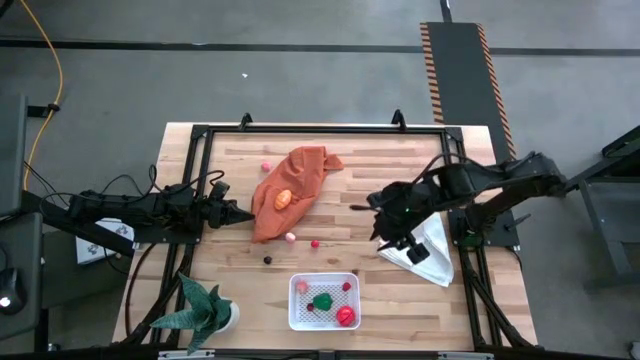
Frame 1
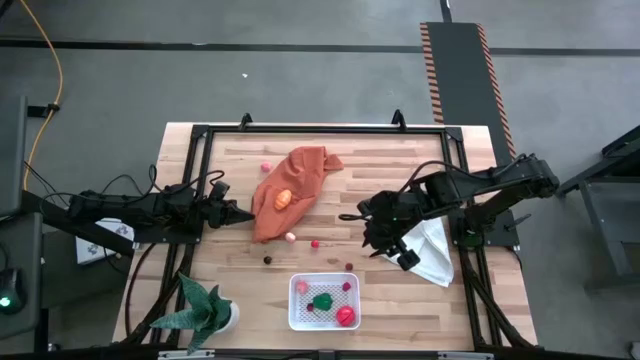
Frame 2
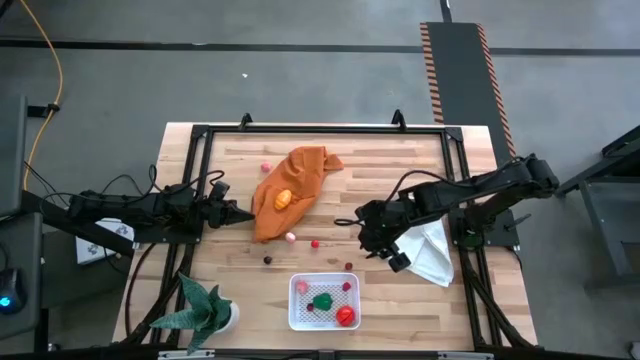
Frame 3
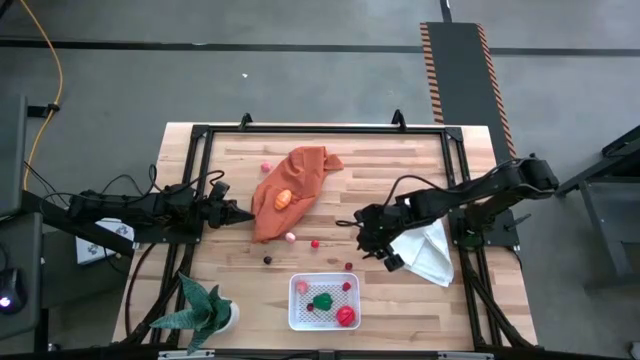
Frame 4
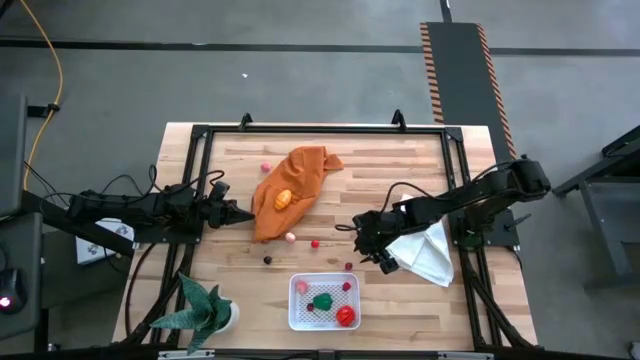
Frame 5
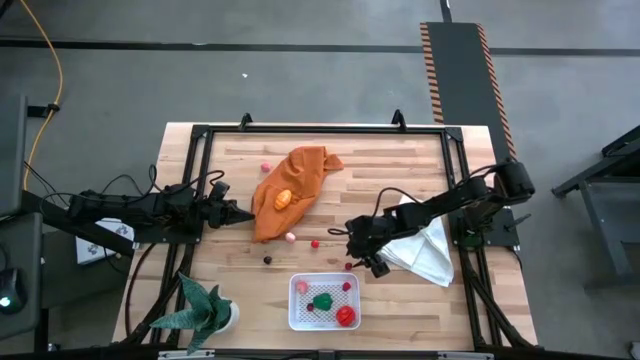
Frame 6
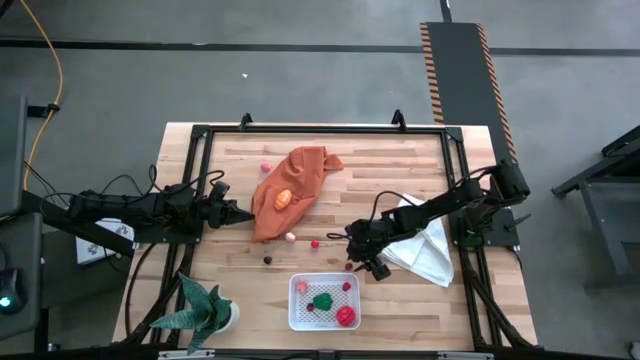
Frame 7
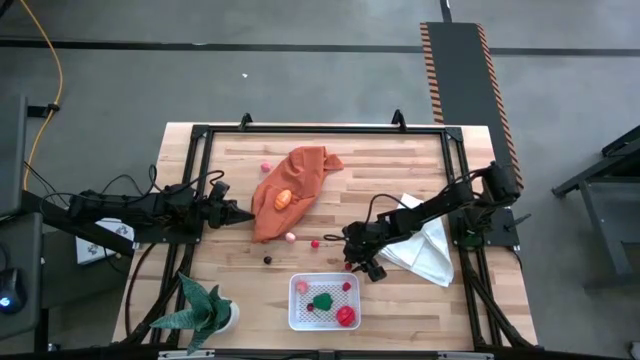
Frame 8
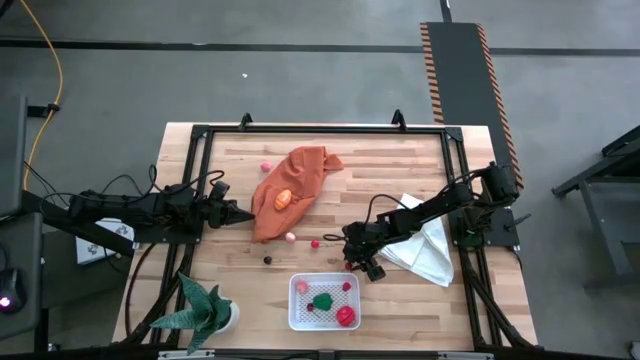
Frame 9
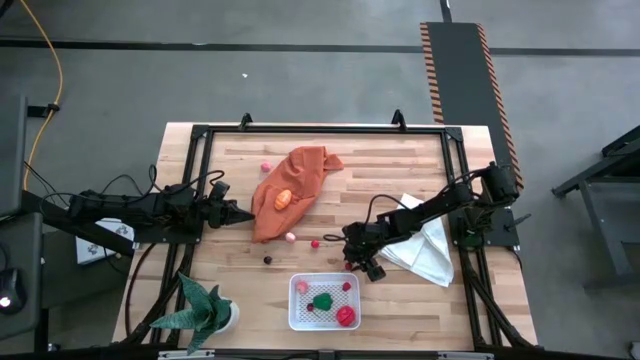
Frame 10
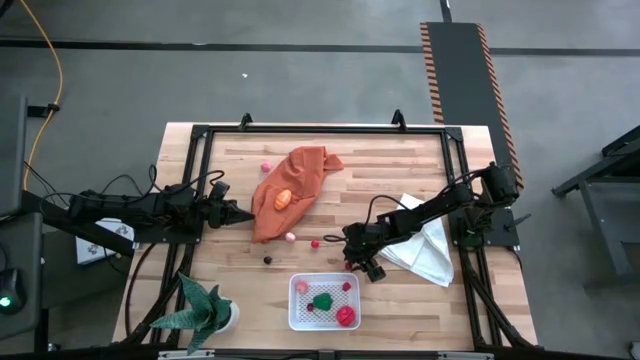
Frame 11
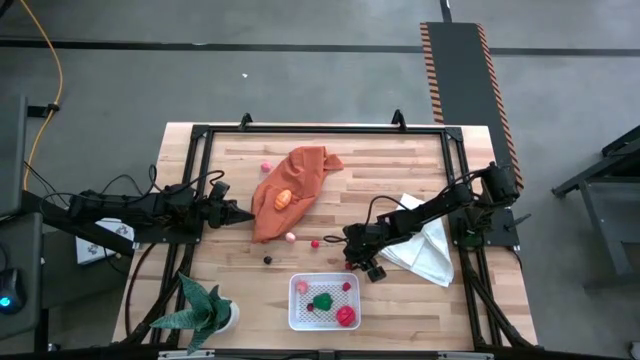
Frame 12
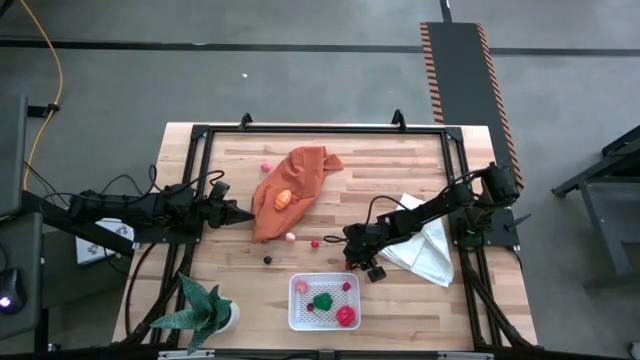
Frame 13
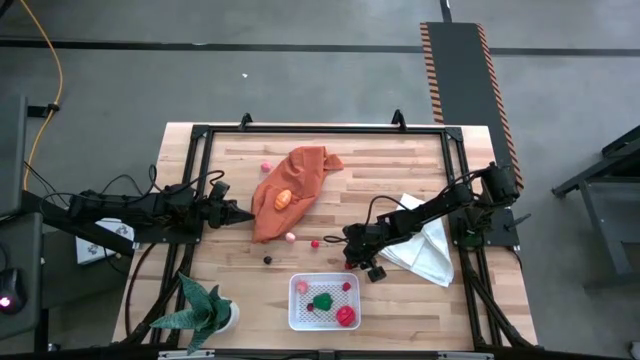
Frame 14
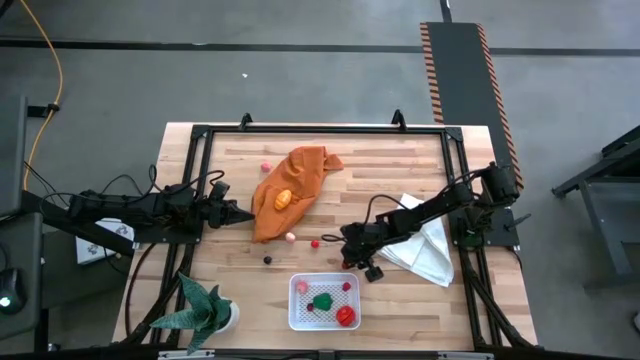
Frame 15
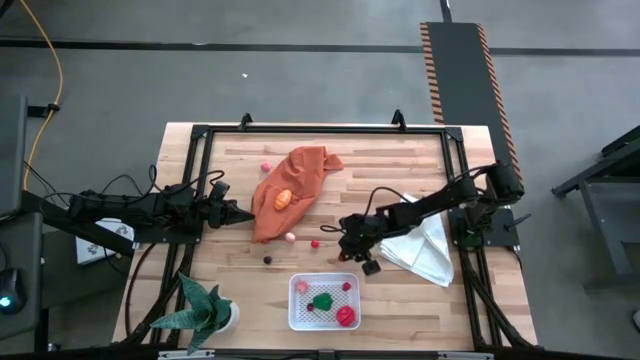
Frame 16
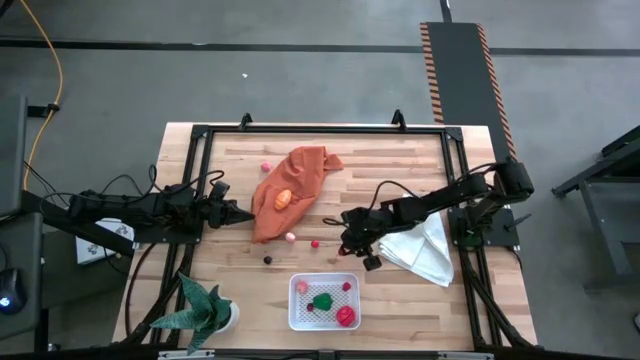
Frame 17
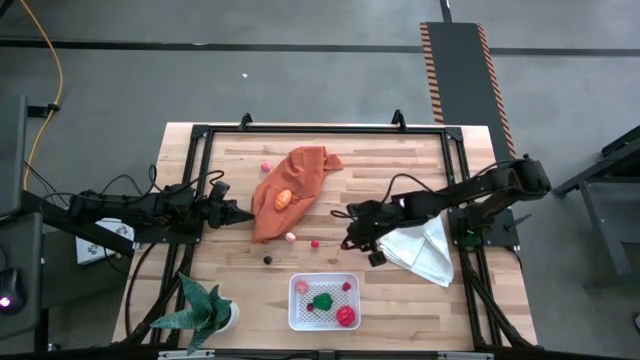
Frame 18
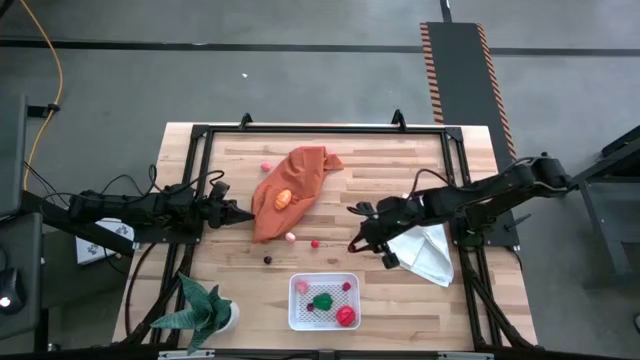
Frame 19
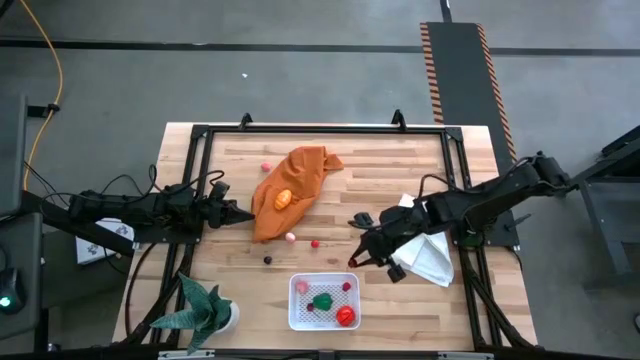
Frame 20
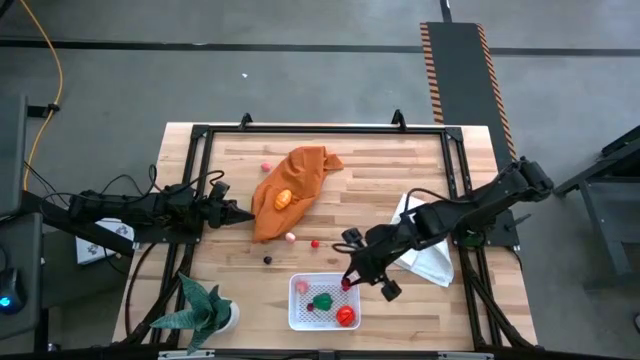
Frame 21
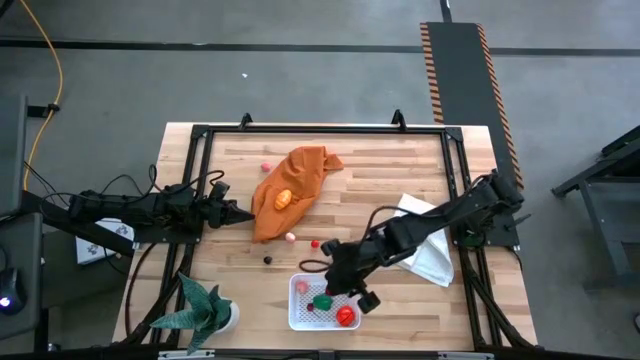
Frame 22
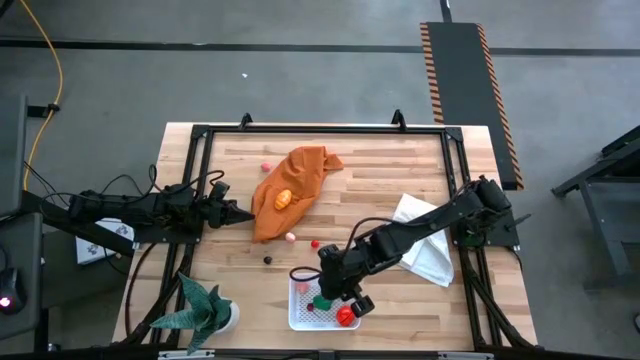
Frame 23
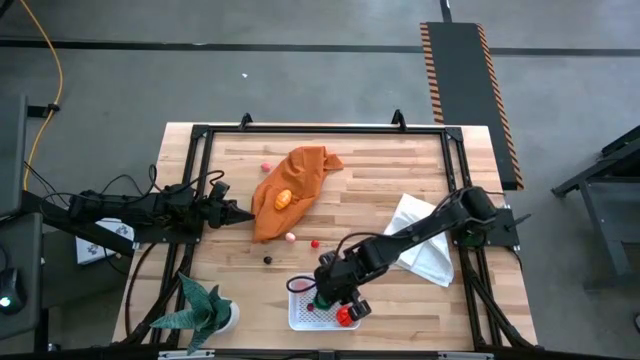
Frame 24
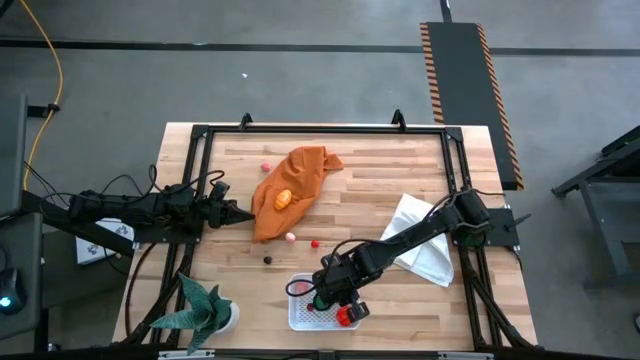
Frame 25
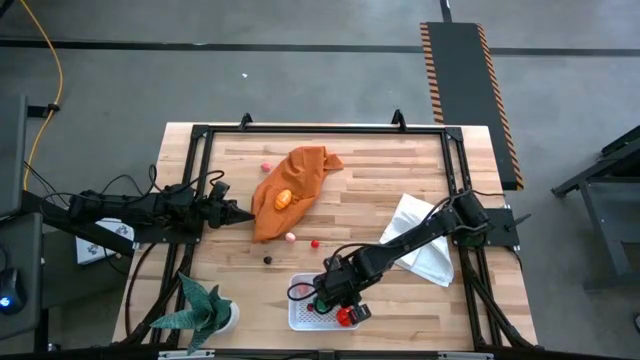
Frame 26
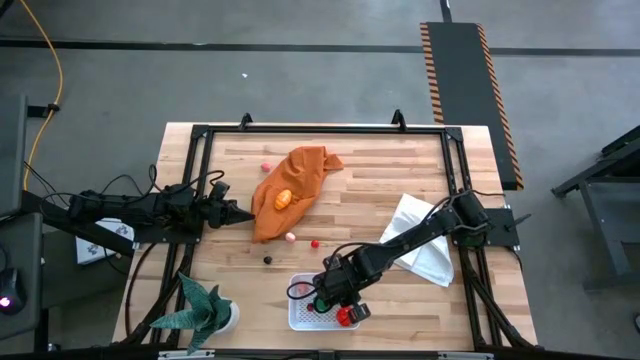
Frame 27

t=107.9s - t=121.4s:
Task: Pick and placing Produce into tupperware
Put the bottom red cherry into the white bin

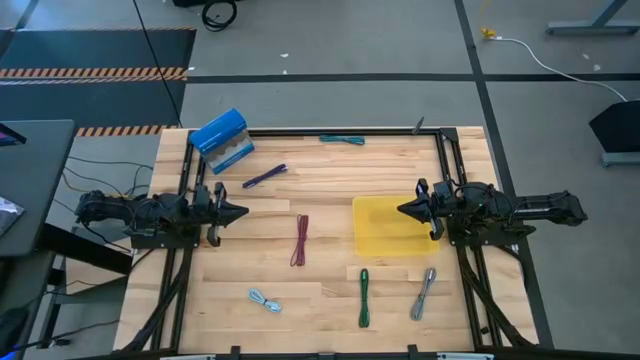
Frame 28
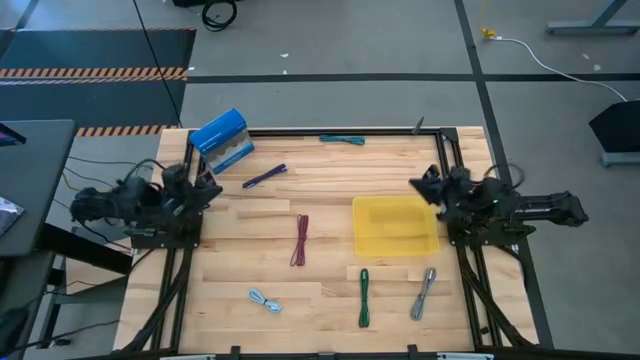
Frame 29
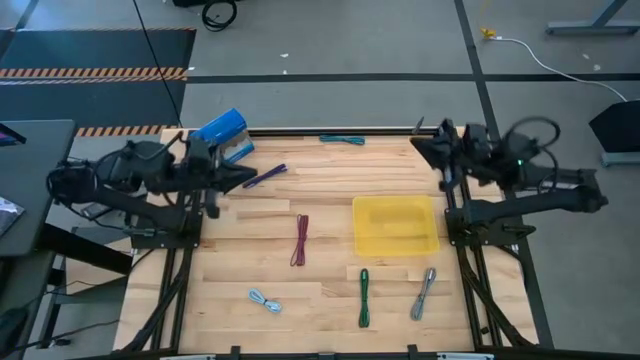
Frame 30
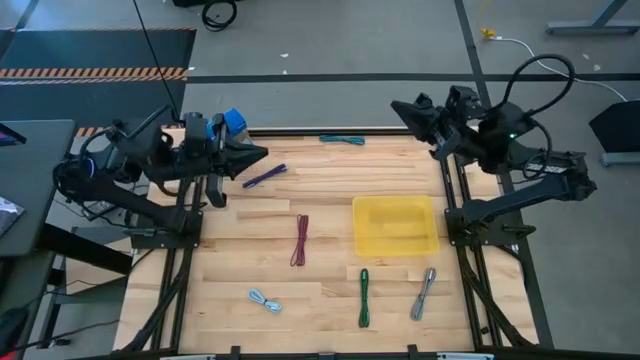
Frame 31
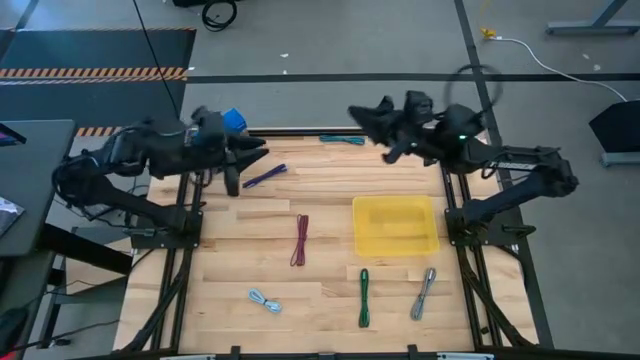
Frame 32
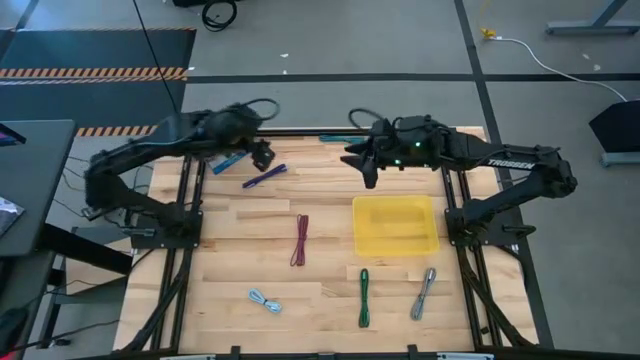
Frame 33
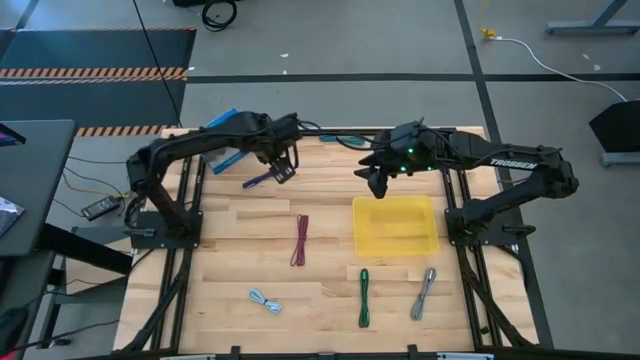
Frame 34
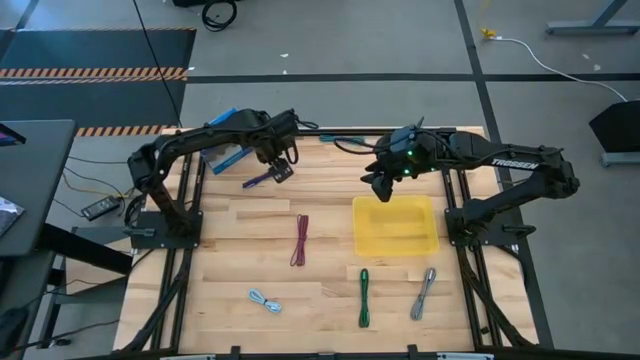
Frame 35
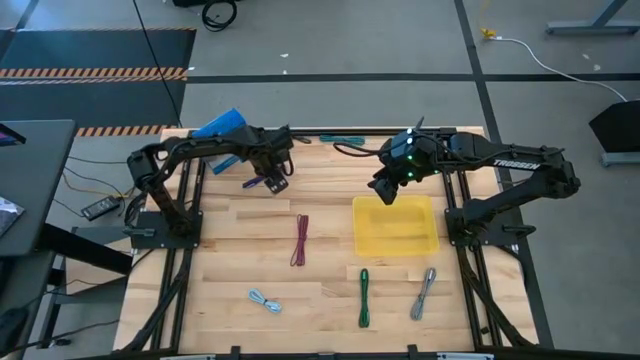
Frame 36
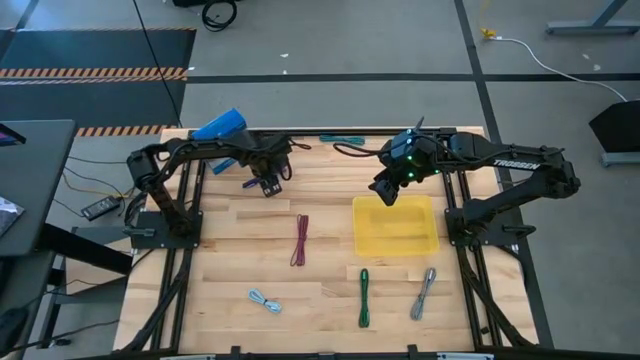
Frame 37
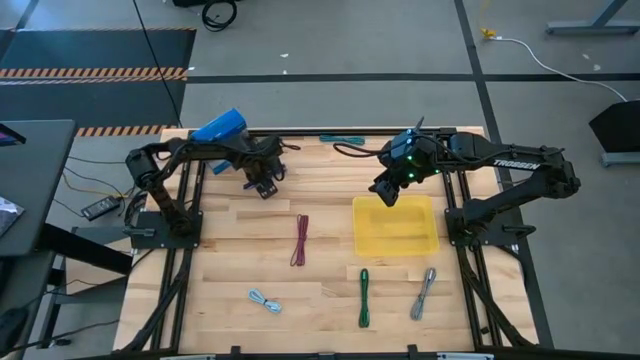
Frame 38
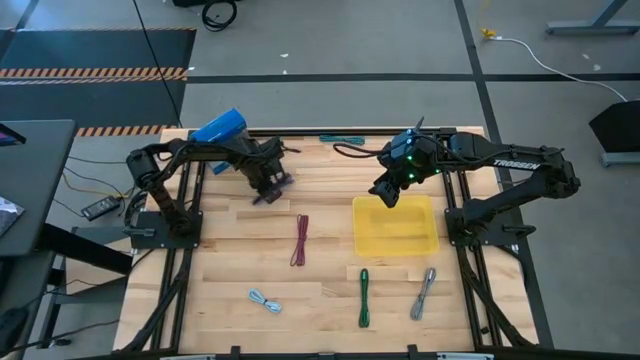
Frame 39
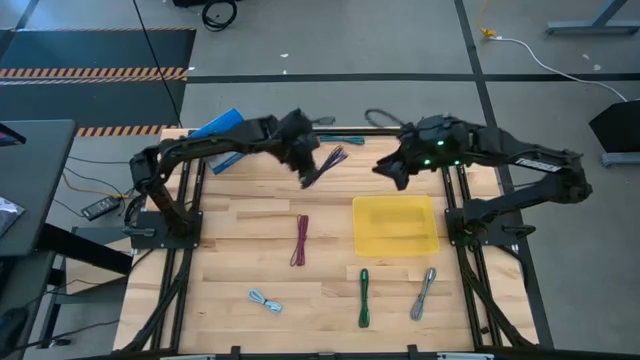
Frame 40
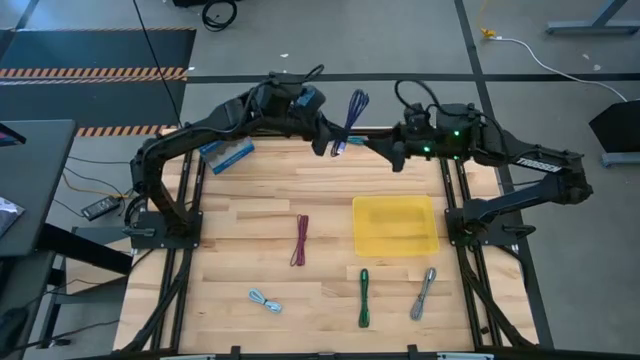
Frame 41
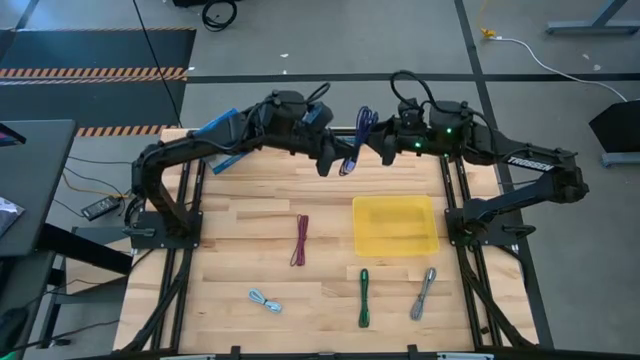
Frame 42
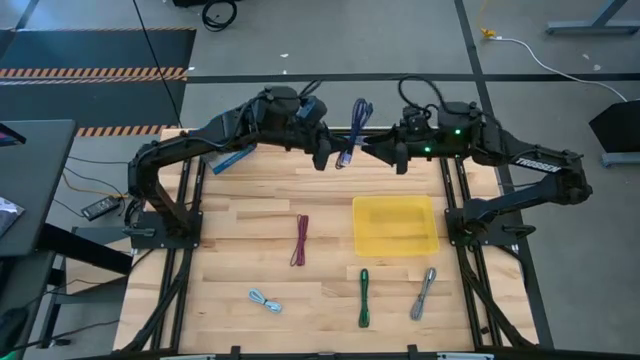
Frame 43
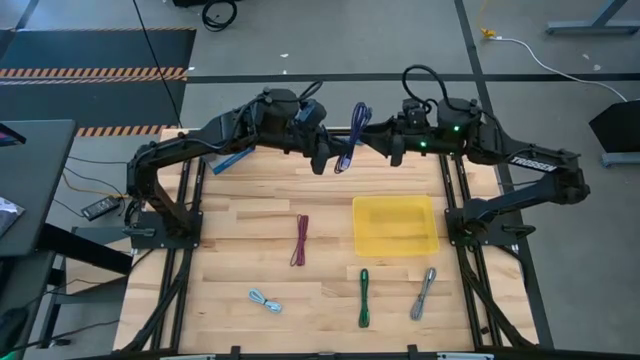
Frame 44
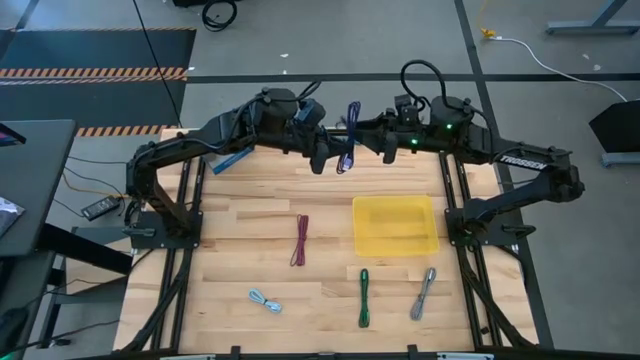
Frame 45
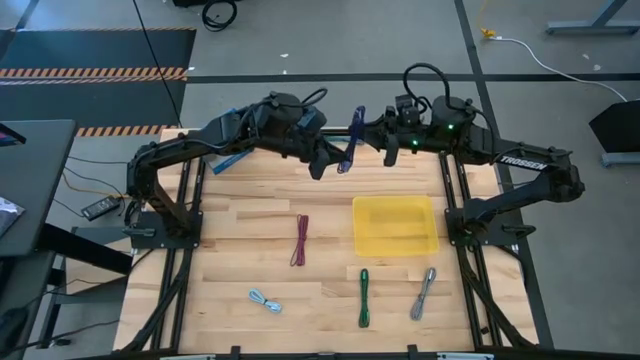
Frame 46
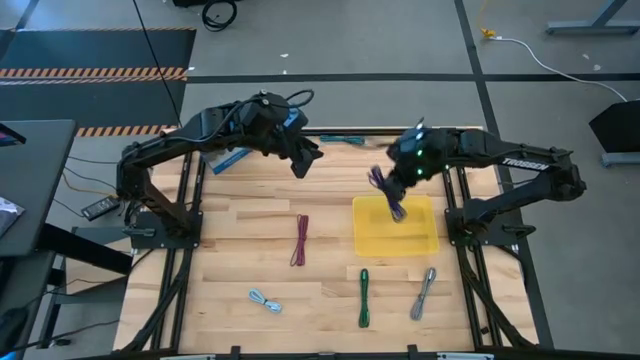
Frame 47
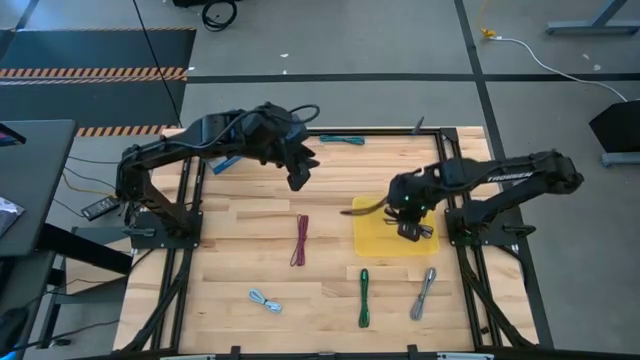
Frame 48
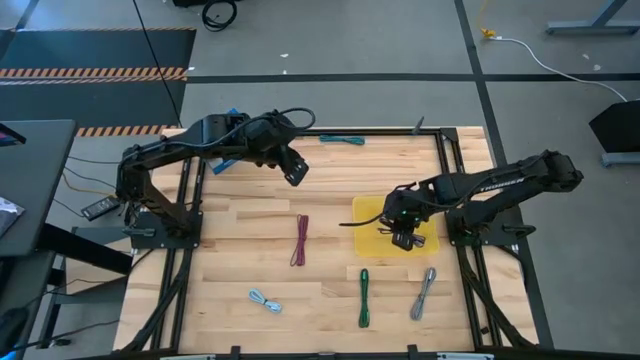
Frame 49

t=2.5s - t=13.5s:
Task: Pick and place USB-C Cables
Put the violet charger cable into the yellow bin
